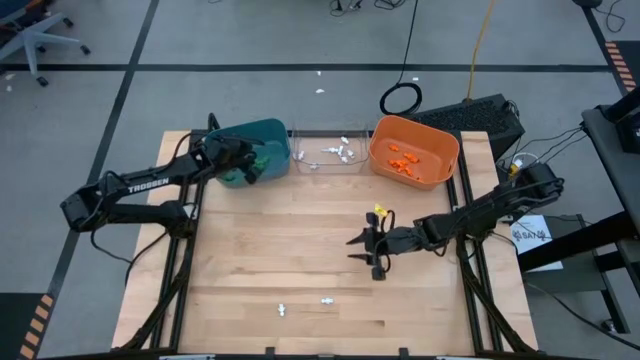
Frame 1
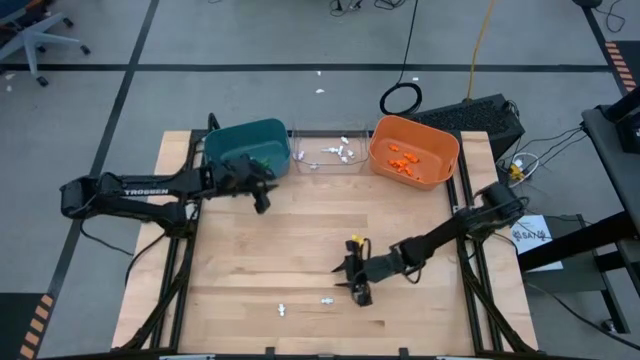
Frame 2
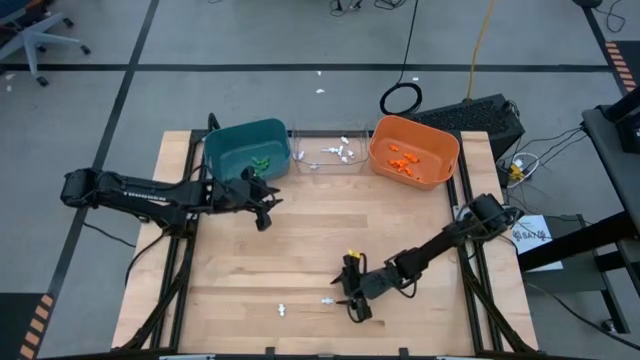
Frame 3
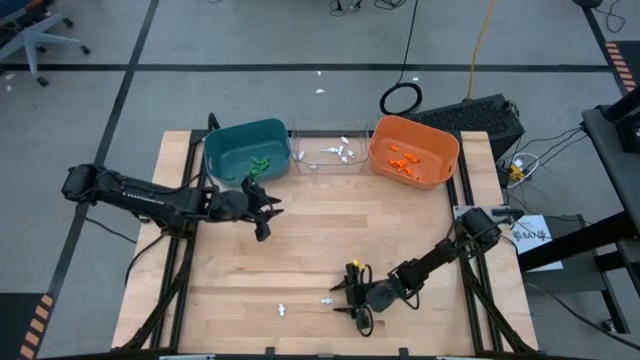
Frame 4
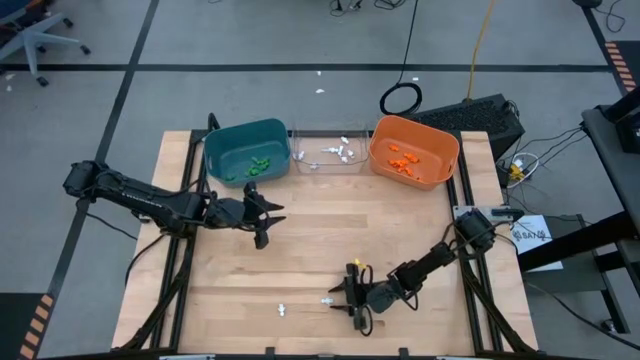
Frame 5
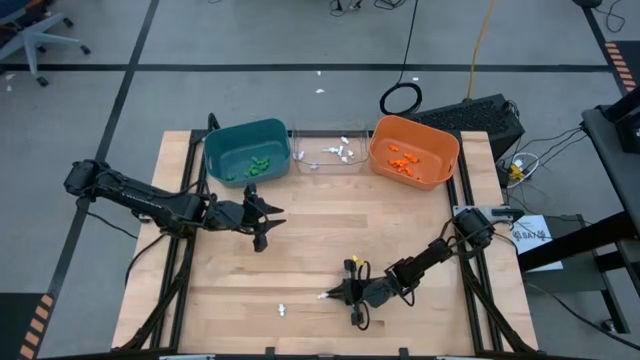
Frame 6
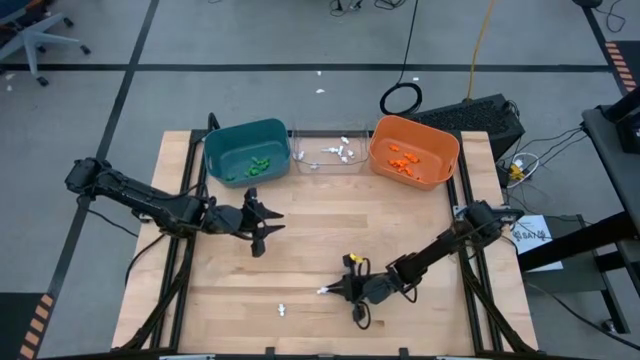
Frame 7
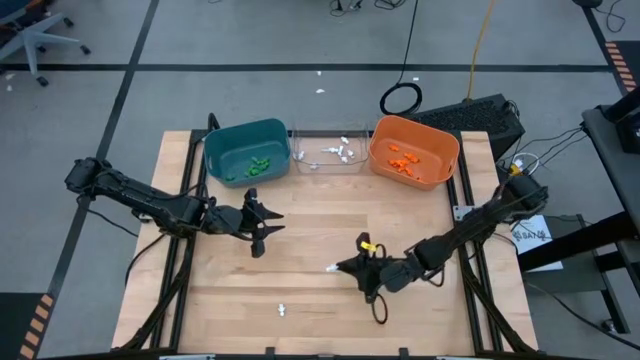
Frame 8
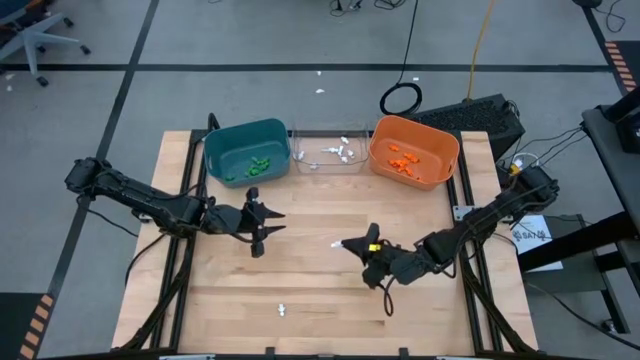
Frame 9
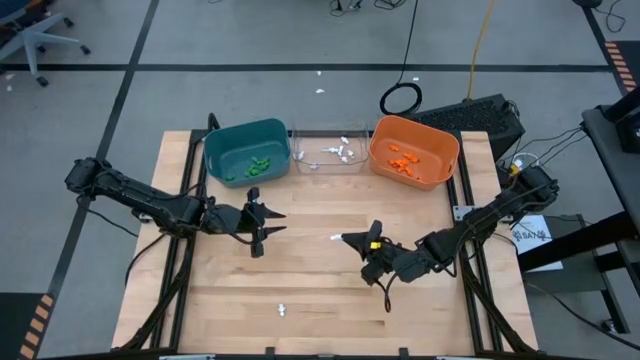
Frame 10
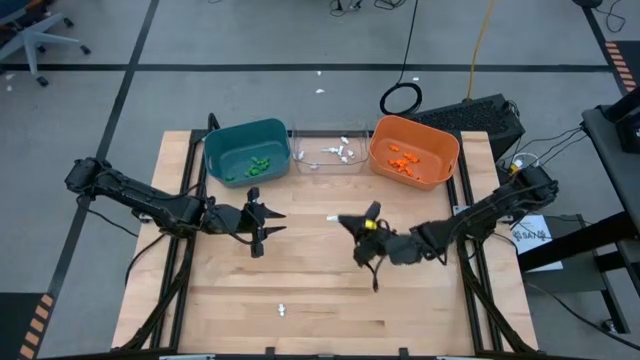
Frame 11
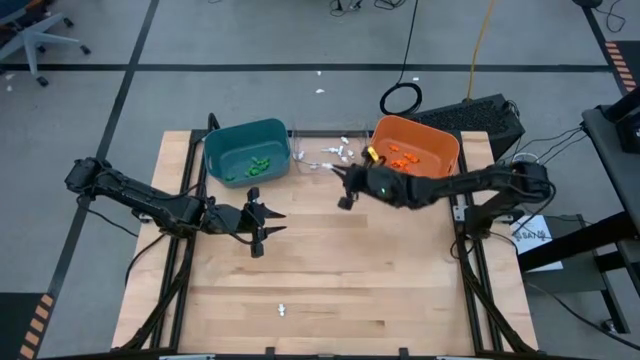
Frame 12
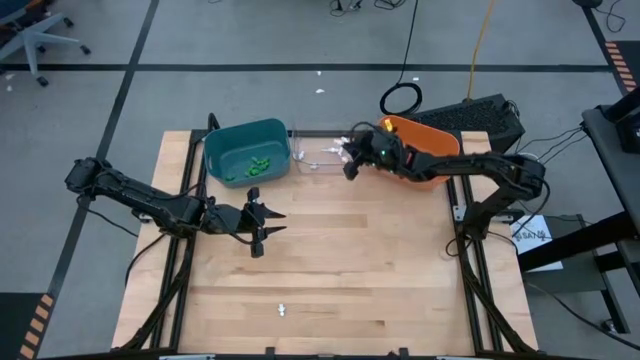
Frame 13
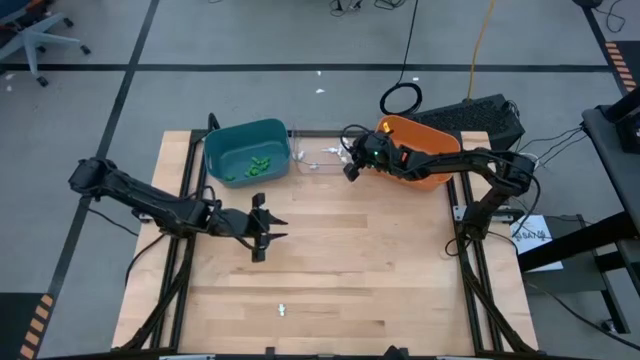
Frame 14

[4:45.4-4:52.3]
Task: Sort Halloween decoration
Put the white skeleton toy into the transparent bin

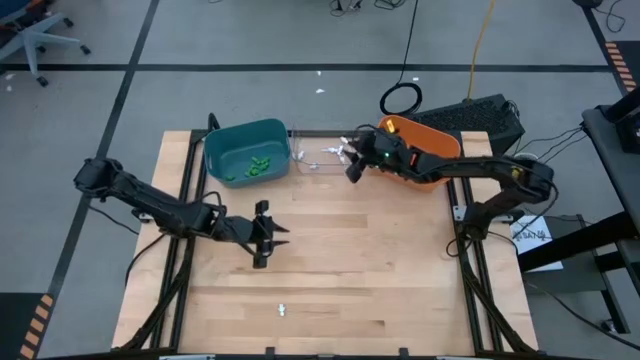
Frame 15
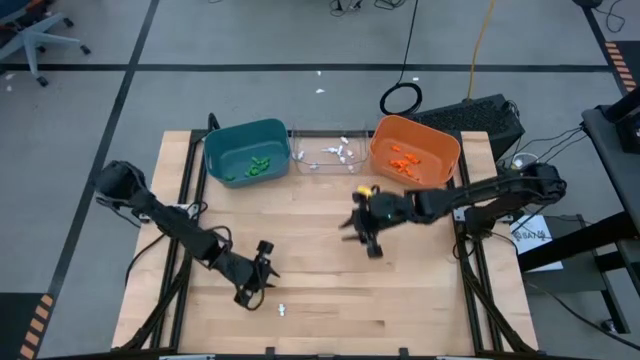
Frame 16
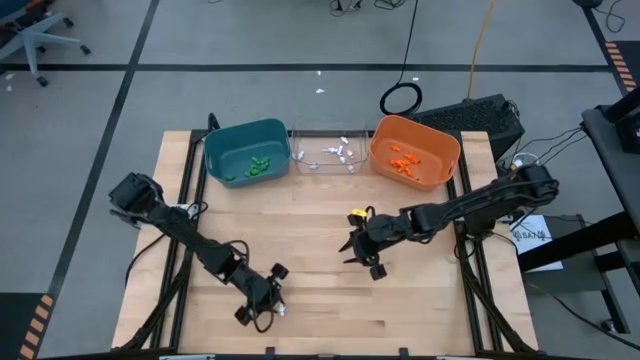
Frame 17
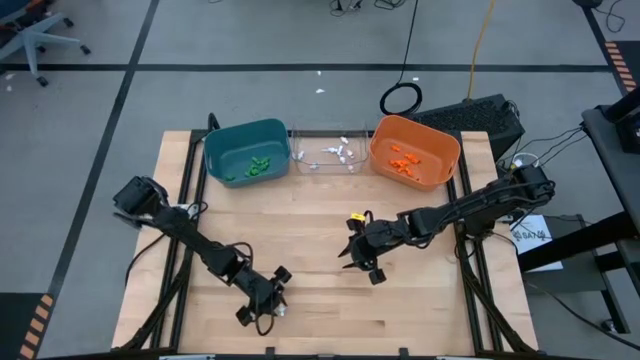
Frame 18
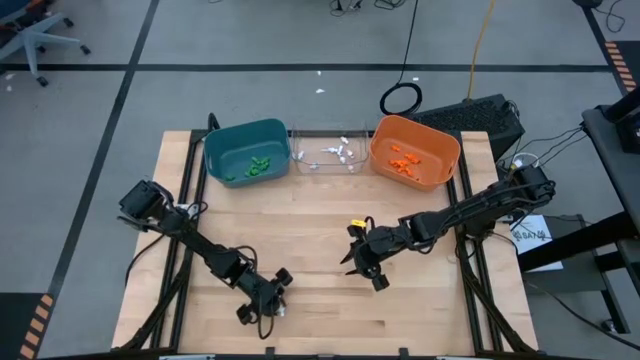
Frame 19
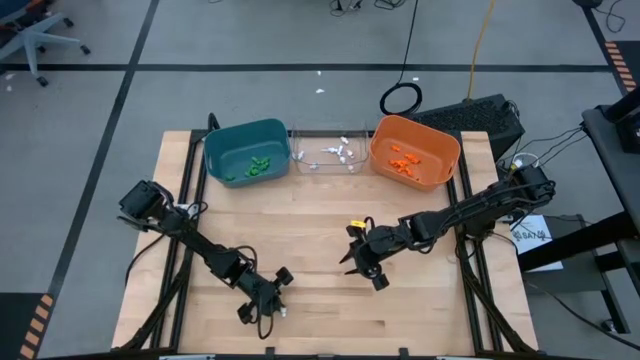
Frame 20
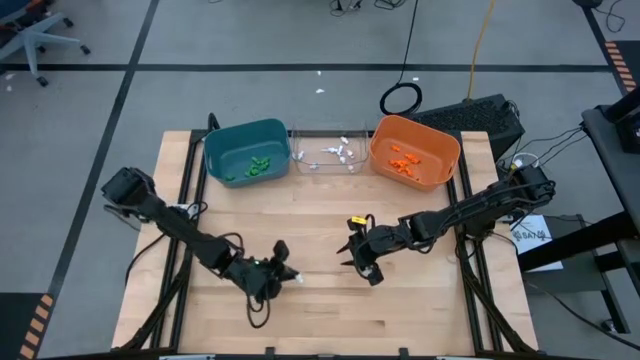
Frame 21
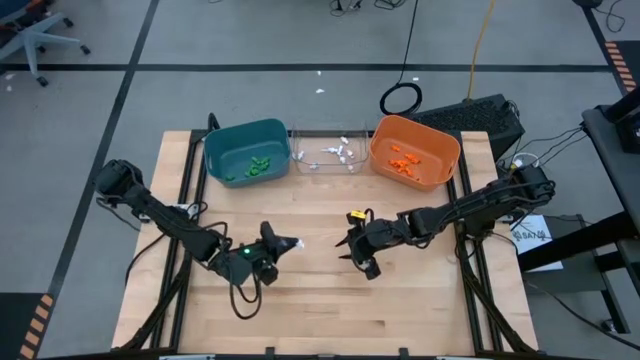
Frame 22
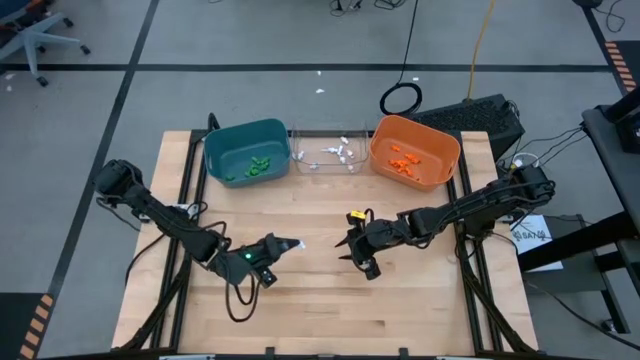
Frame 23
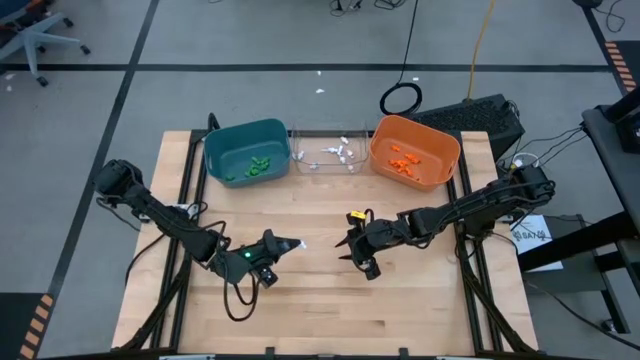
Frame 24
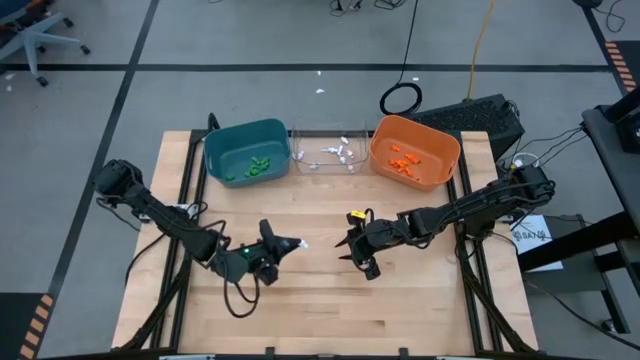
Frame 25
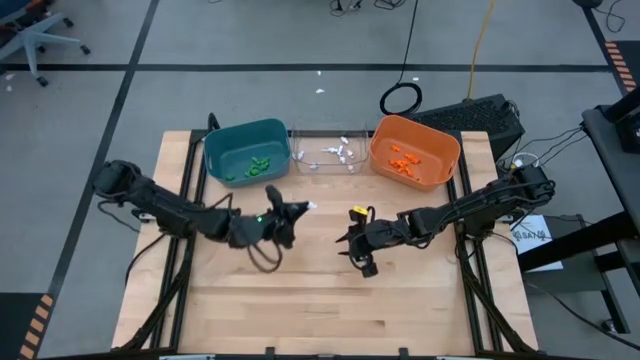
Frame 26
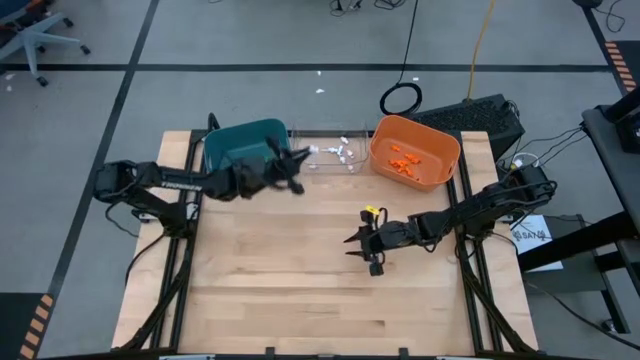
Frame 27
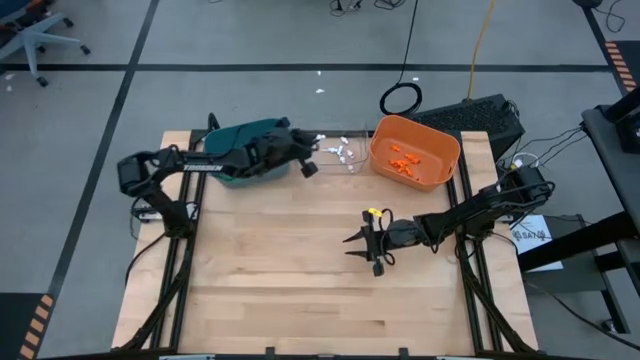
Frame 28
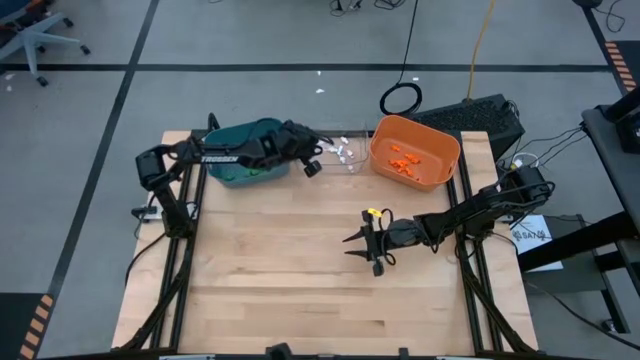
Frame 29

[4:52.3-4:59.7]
Put the white skeleton toy into the transparent bin

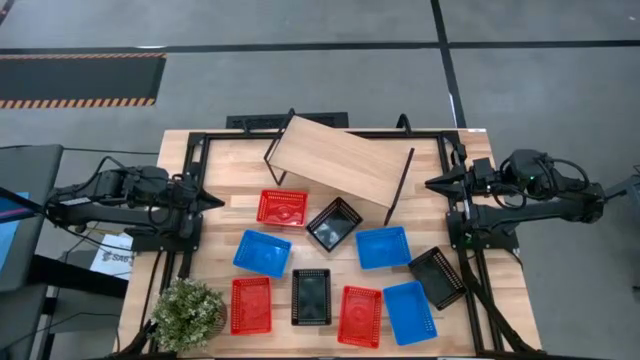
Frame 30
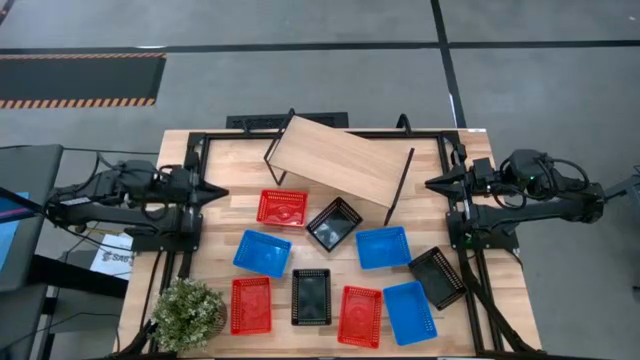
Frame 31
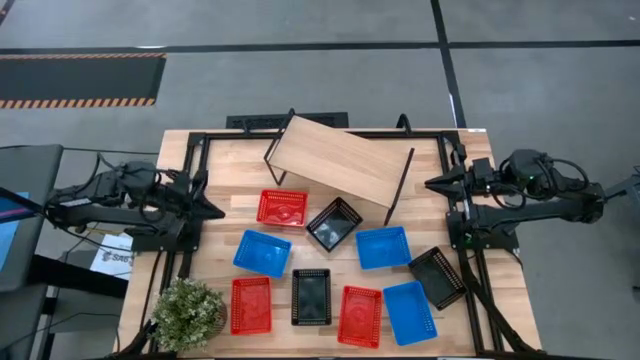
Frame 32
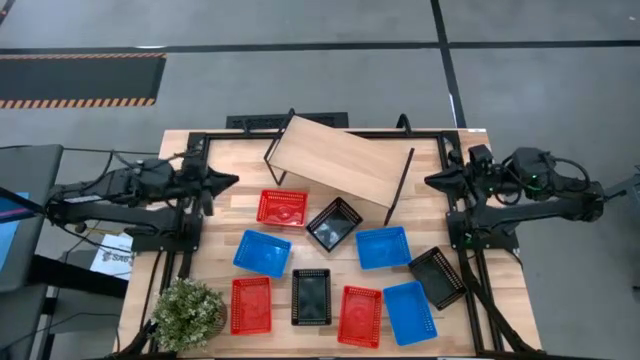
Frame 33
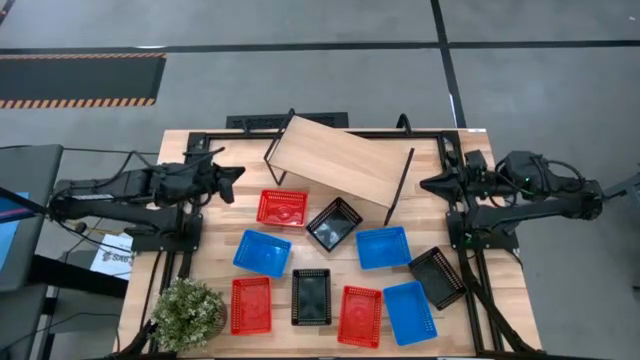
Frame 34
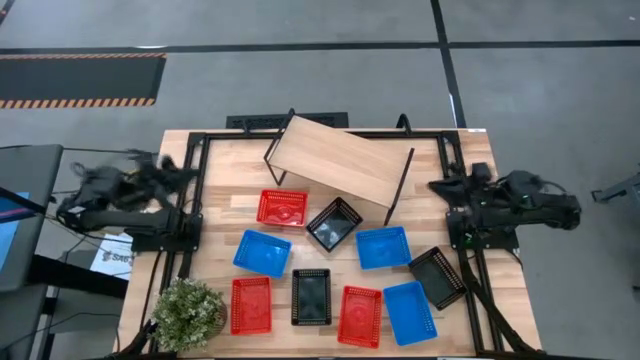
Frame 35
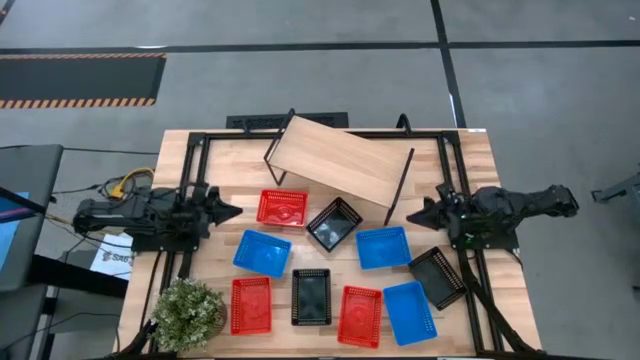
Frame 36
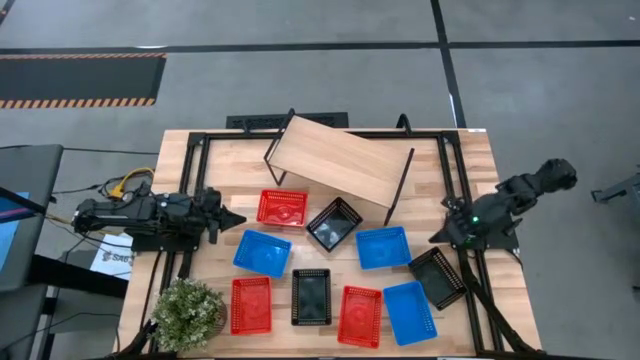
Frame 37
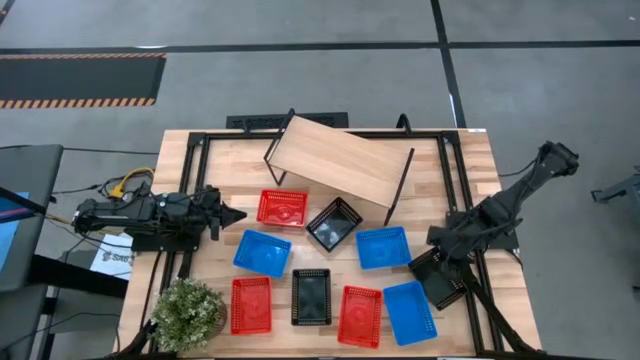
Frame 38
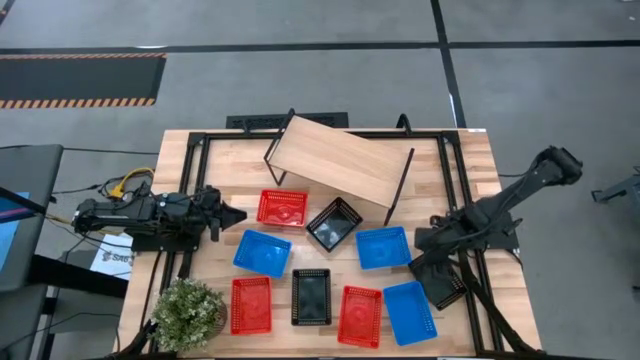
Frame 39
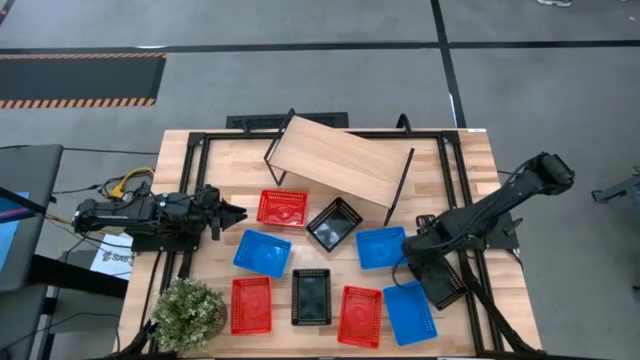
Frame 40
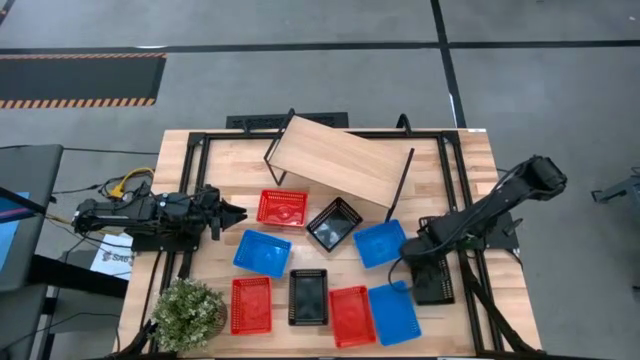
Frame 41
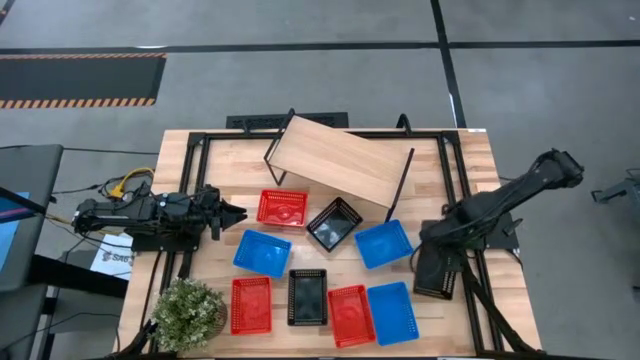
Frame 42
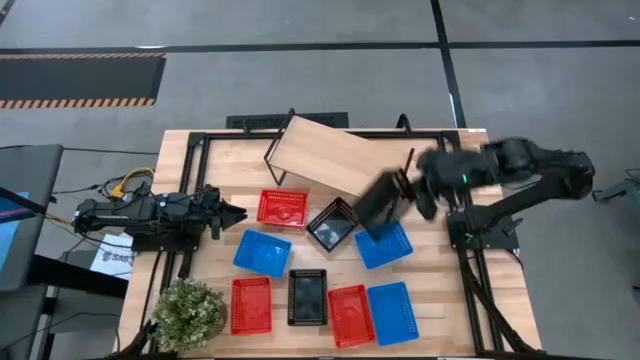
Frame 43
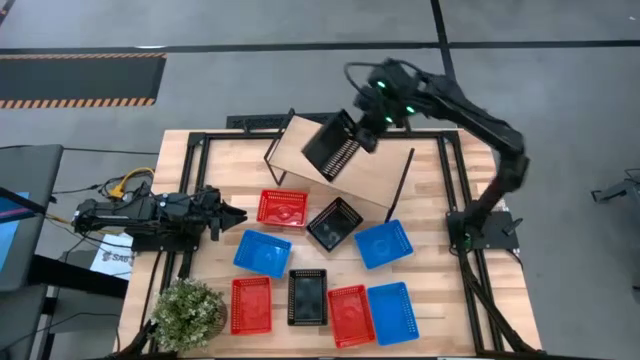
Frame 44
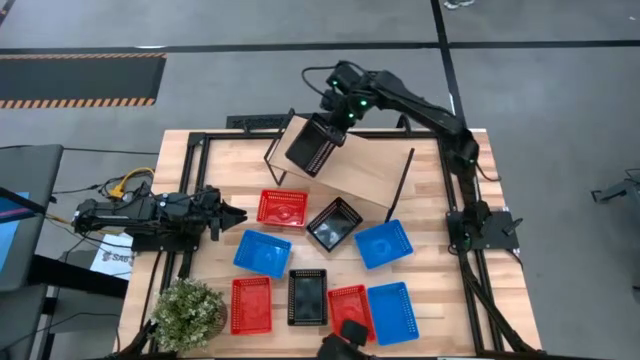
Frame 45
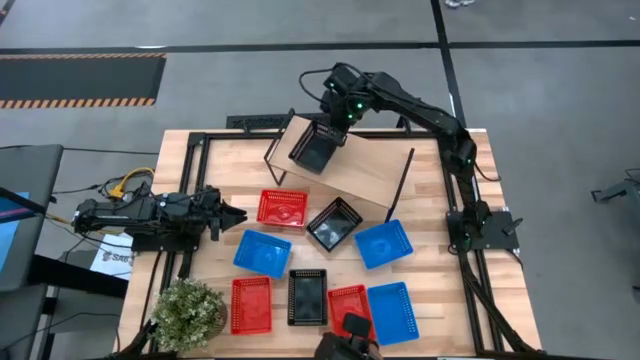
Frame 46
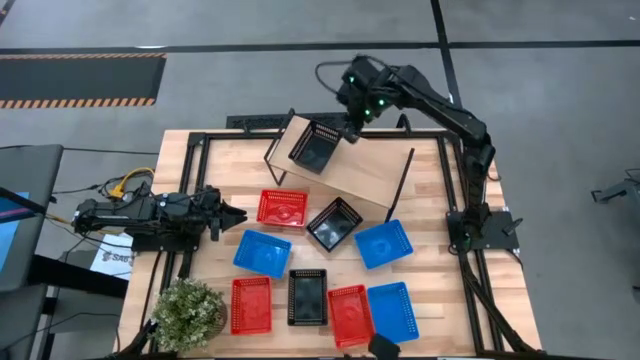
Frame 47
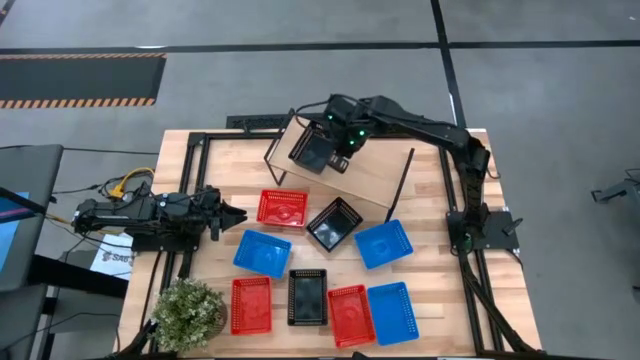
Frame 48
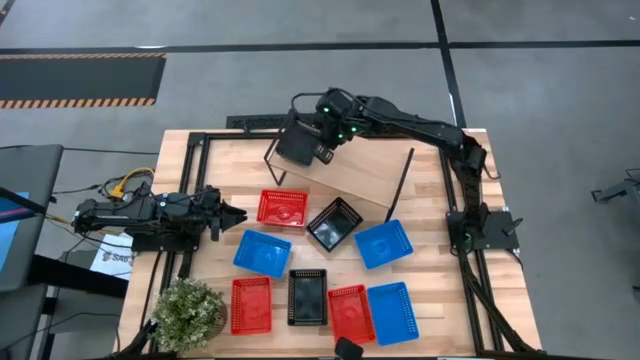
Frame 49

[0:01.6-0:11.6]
Task: Stack baskets on shelf by color
Put the bottom right black bin on the shelf
